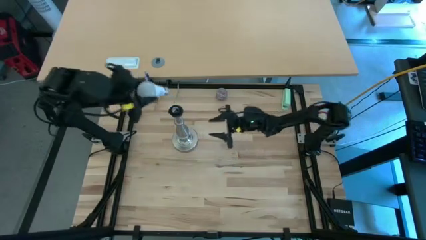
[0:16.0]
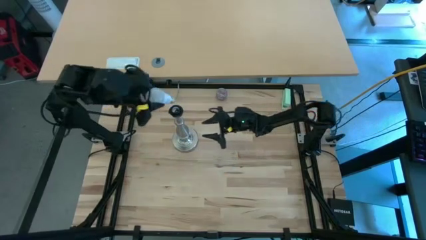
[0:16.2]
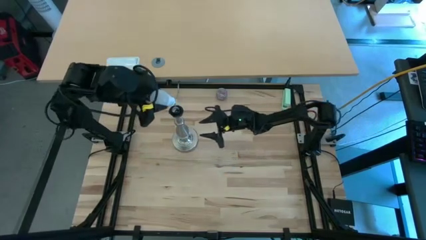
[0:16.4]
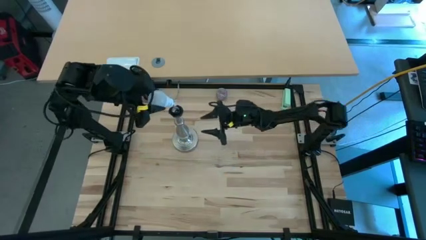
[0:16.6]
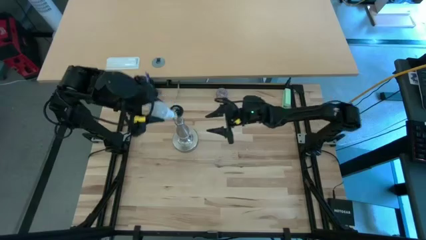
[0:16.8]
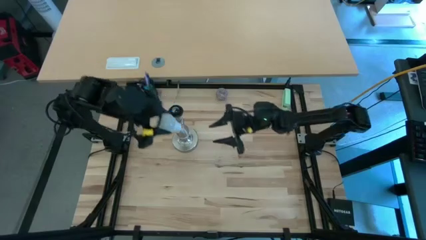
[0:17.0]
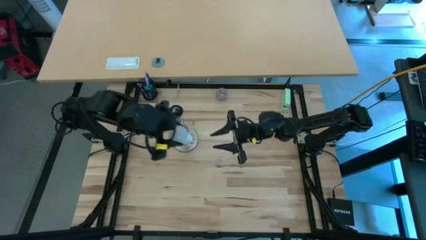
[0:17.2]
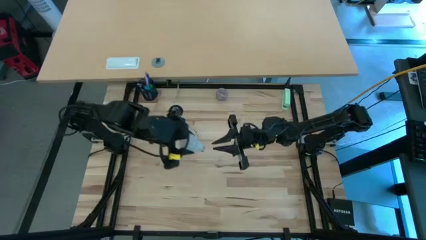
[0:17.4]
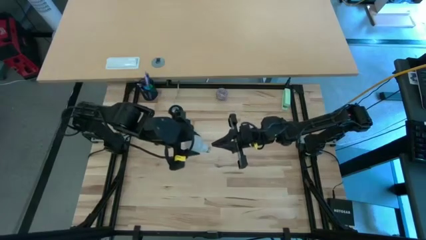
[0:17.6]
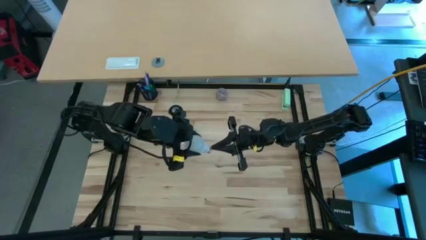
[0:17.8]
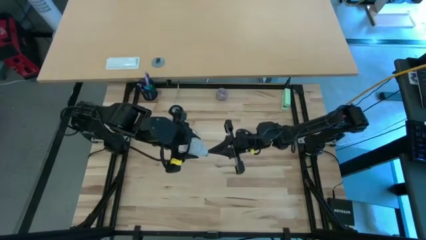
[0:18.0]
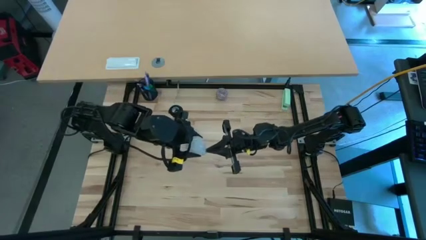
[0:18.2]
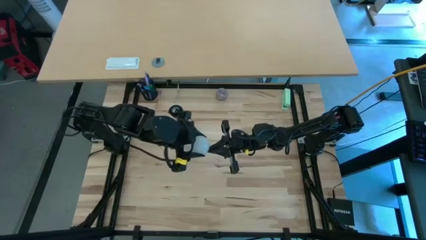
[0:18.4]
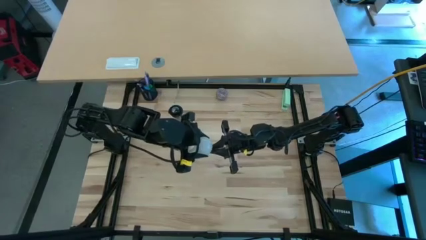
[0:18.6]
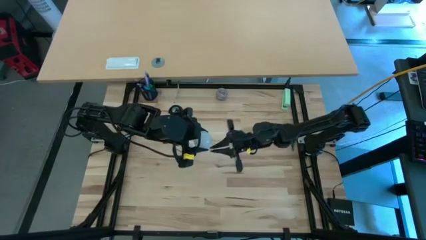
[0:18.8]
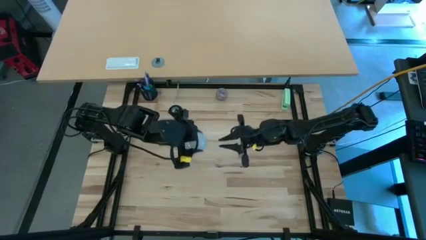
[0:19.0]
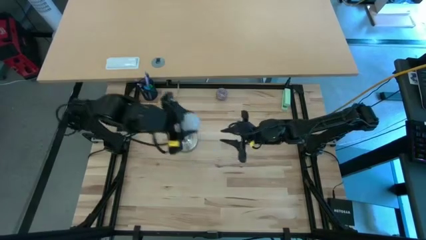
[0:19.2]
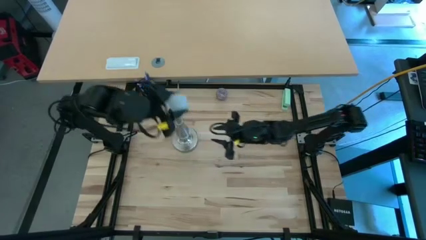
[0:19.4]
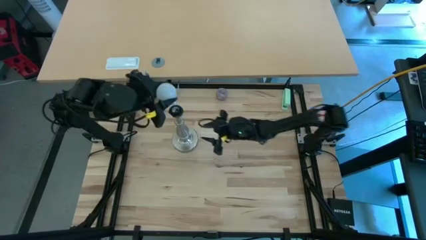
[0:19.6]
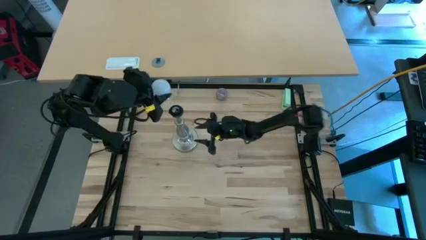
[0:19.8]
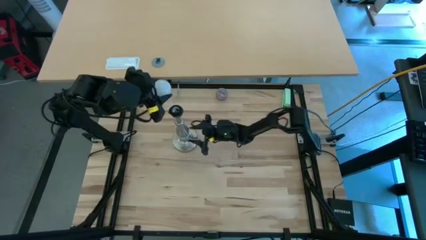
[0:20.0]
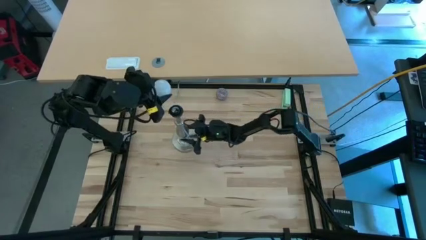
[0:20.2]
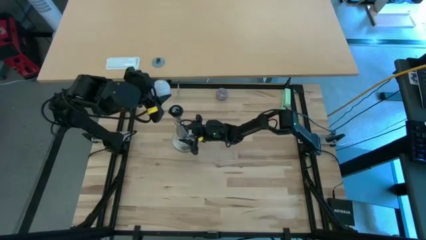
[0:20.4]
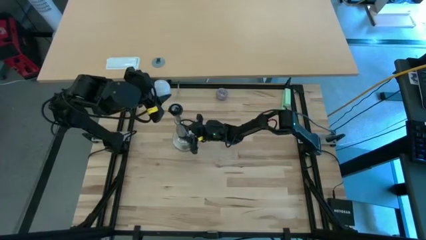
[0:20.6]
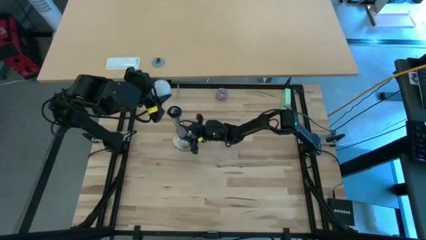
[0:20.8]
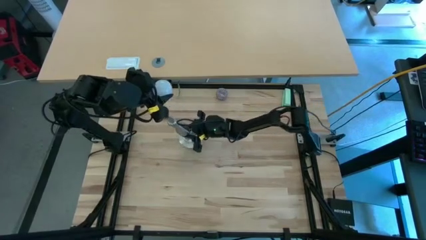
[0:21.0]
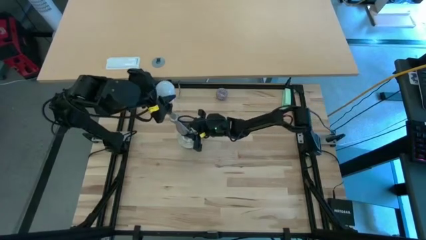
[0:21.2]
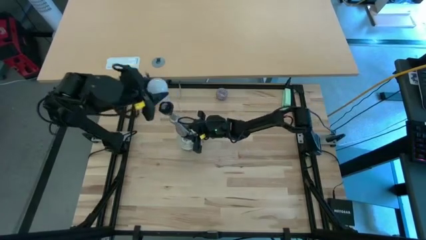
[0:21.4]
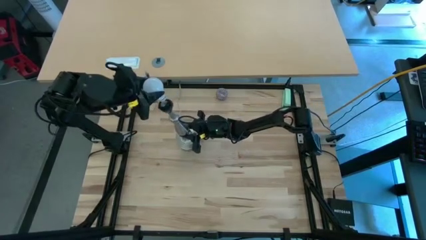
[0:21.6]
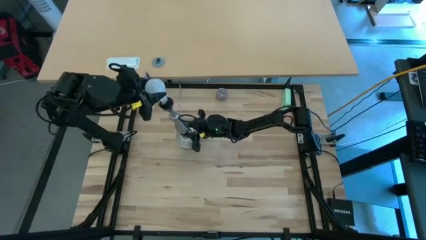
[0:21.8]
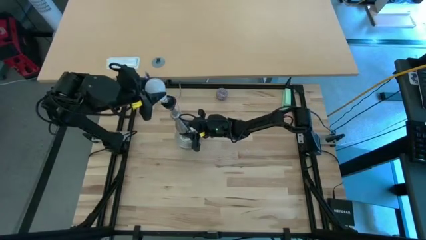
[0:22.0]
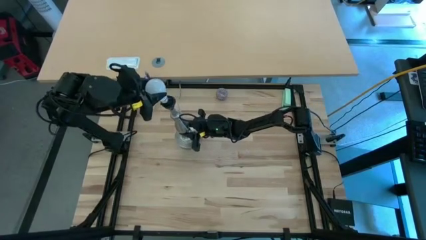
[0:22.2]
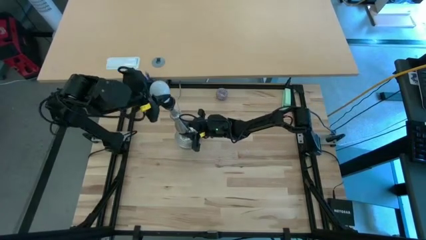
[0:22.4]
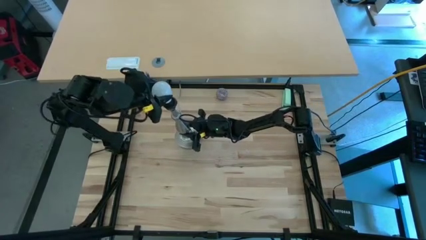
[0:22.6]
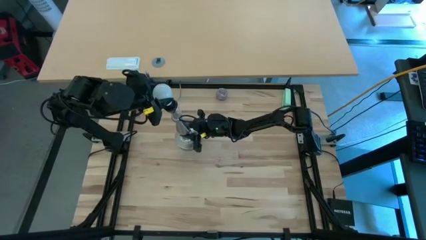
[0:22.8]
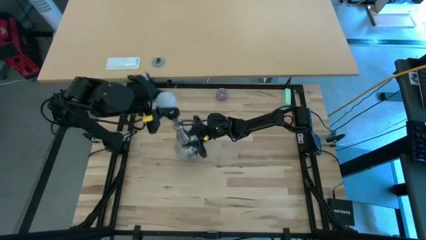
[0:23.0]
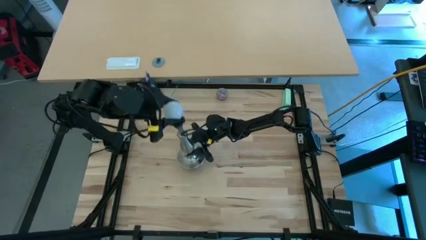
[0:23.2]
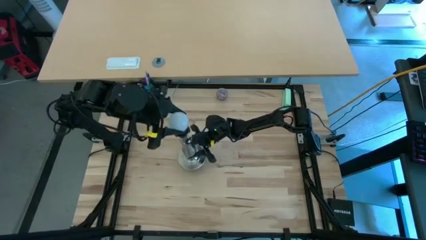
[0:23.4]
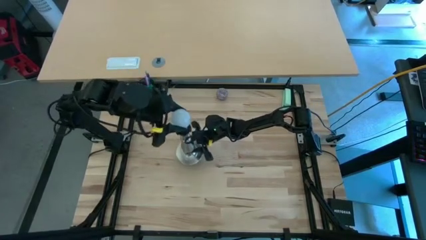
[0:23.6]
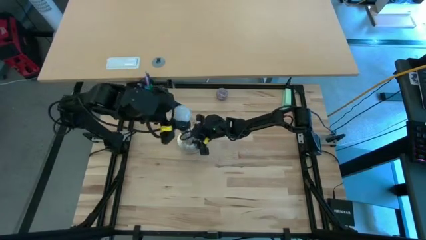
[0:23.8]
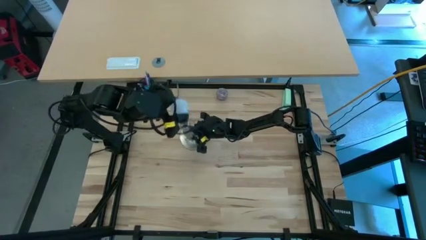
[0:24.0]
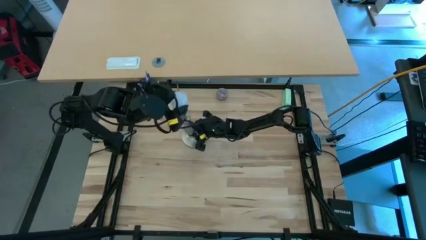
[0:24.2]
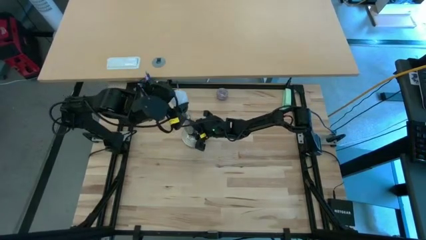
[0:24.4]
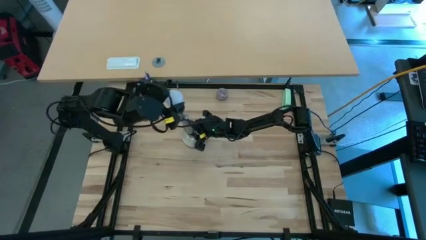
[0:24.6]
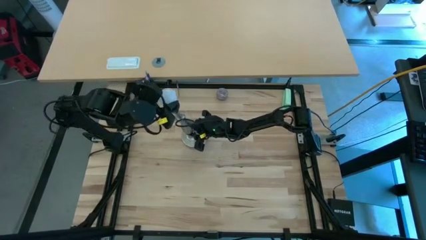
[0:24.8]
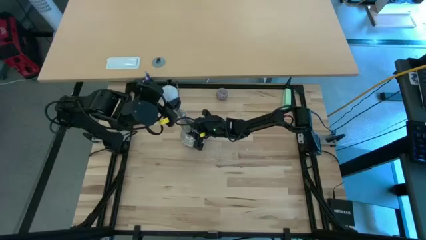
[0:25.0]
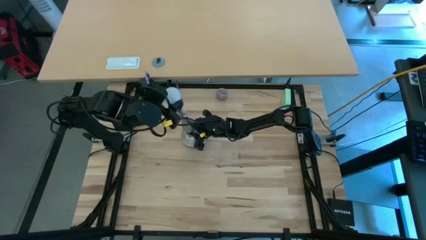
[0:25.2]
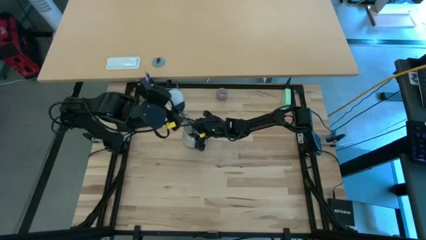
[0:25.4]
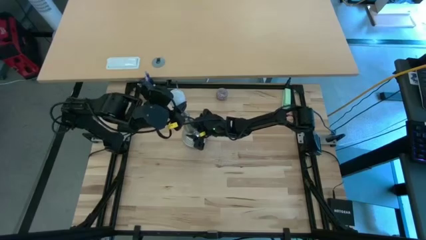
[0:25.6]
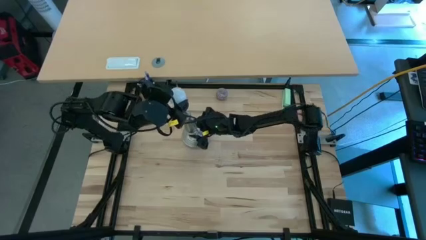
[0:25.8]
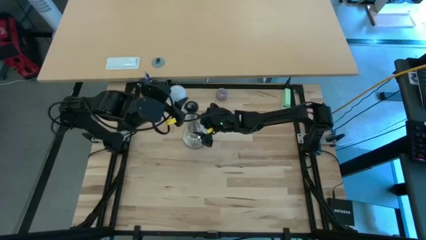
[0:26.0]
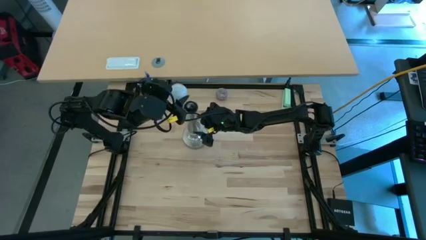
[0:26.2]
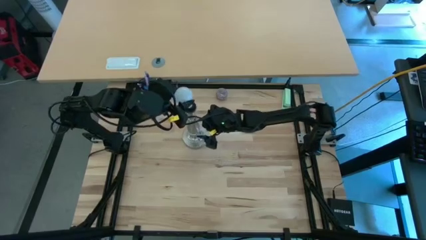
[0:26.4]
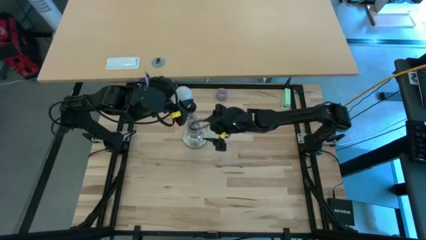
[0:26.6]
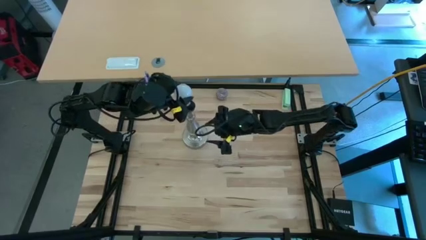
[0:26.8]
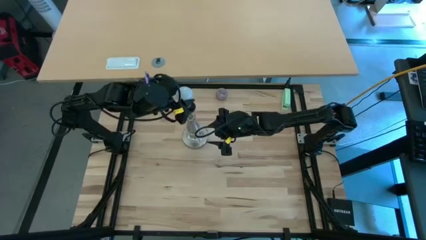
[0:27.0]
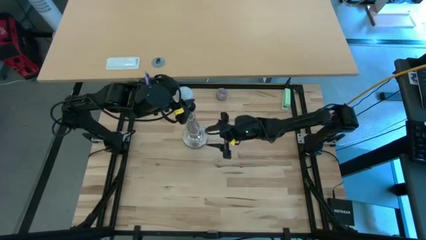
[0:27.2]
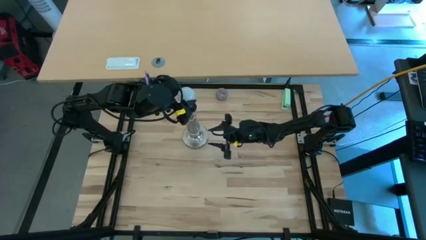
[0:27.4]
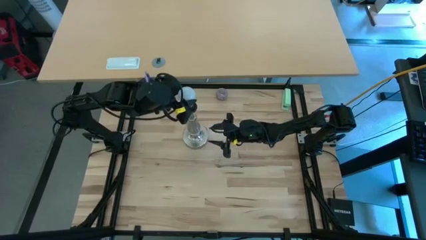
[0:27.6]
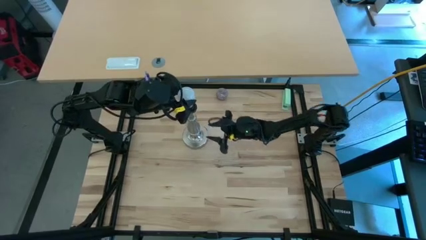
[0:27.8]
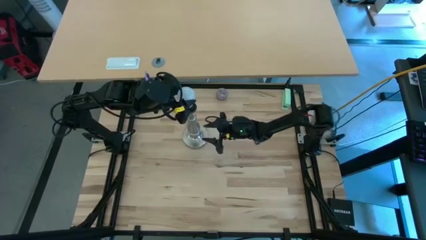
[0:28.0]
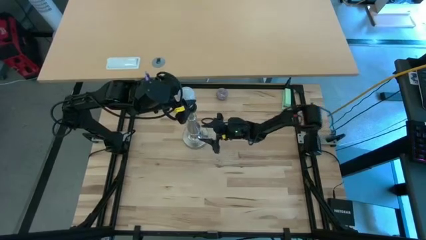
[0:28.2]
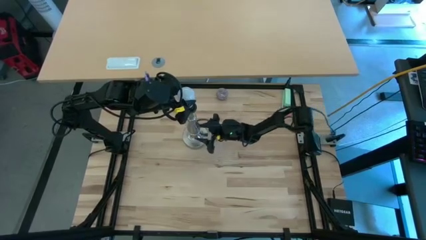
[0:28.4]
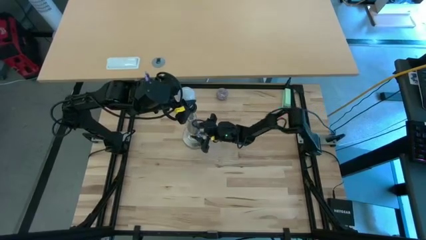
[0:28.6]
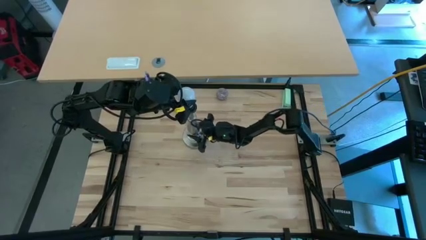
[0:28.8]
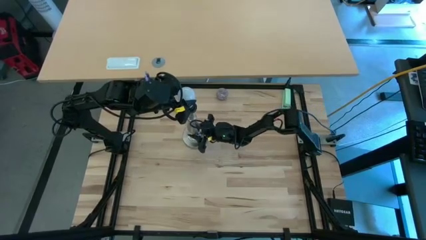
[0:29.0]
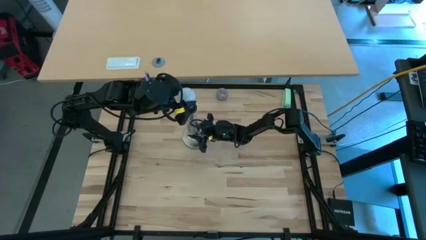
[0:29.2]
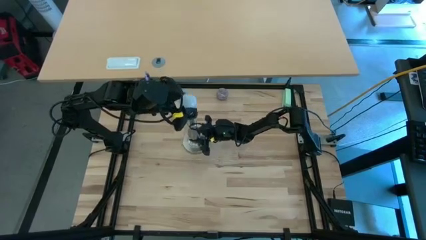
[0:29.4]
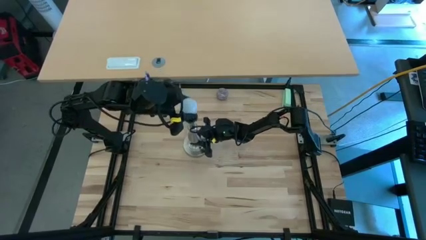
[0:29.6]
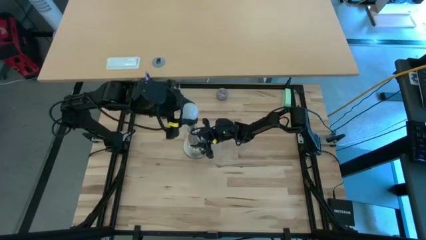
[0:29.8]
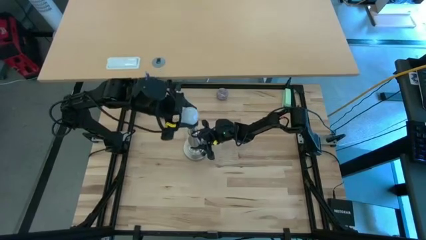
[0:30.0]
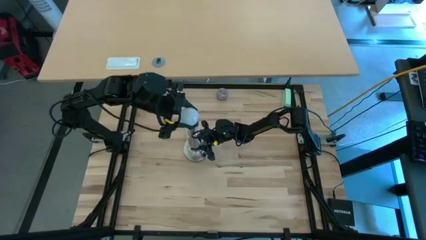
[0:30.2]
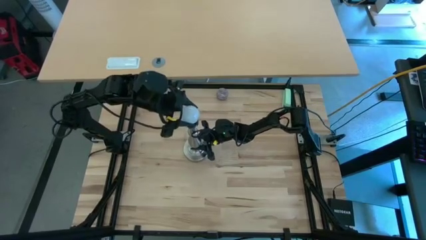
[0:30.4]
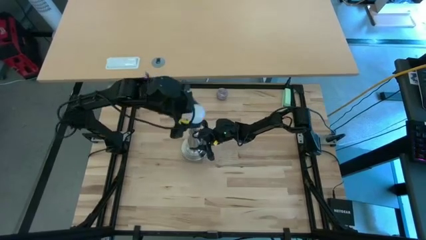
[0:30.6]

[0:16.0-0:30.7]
Task: Screw lightbulb
Insert the lightbulb into the silver lamp
